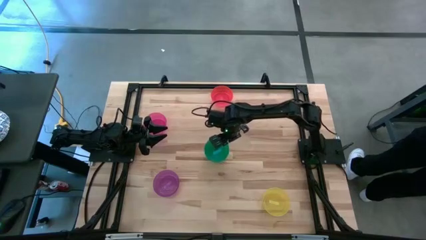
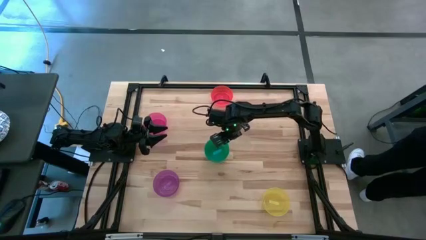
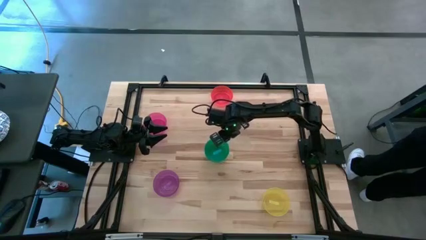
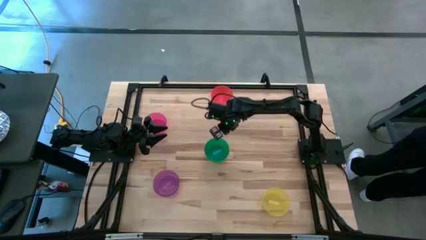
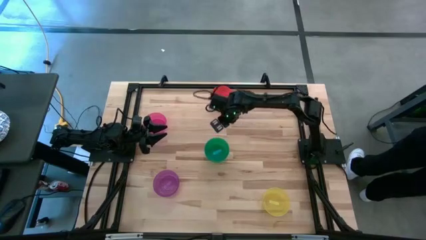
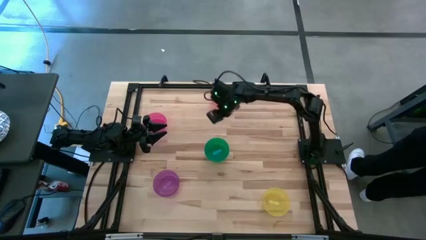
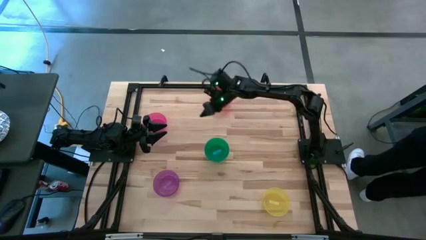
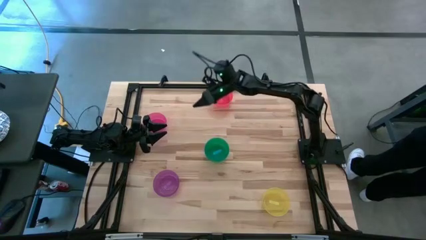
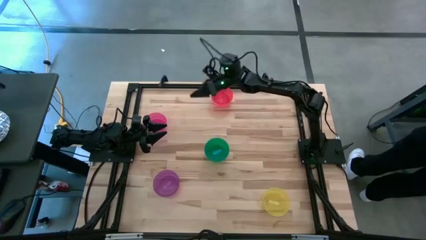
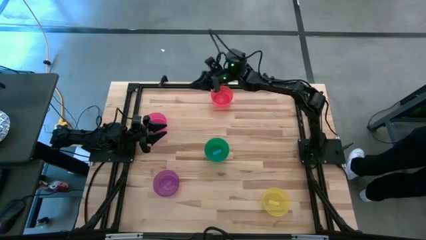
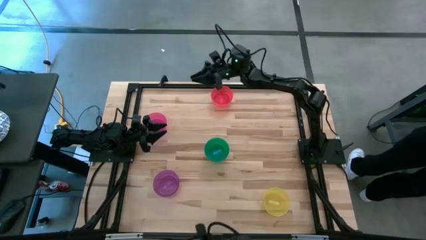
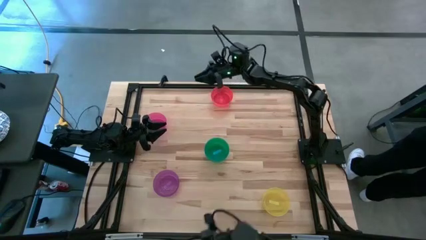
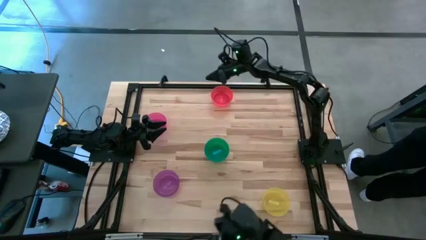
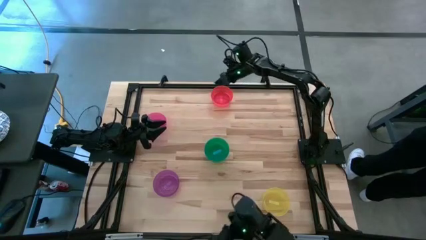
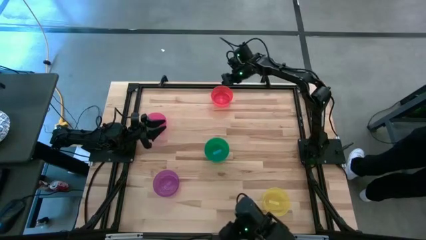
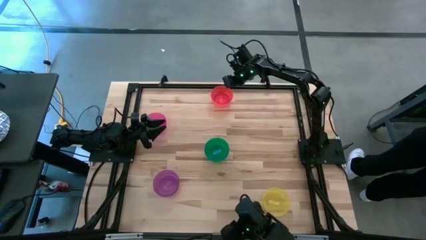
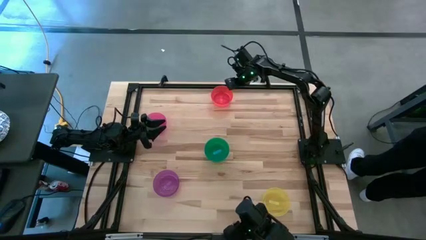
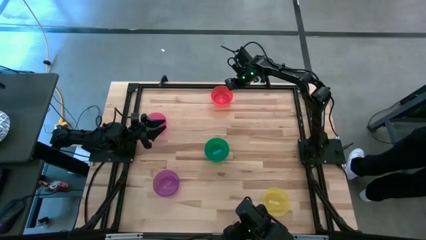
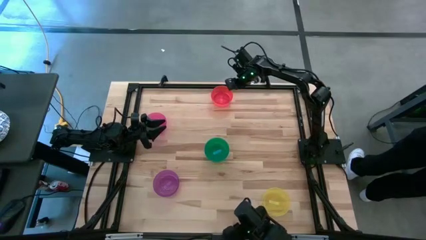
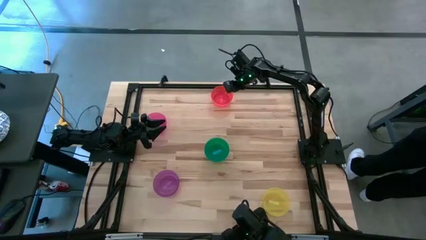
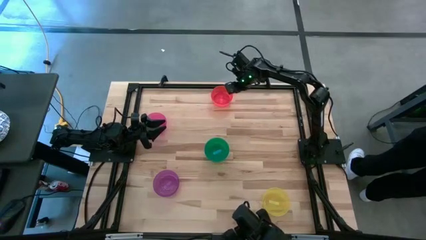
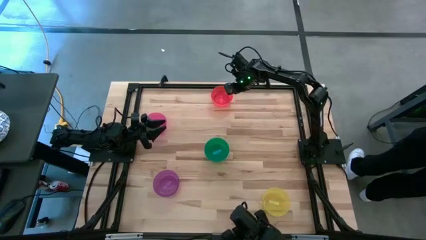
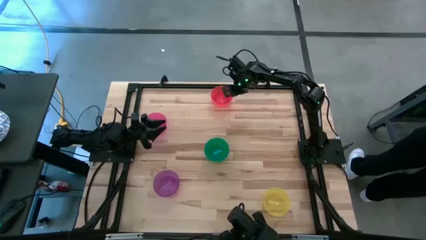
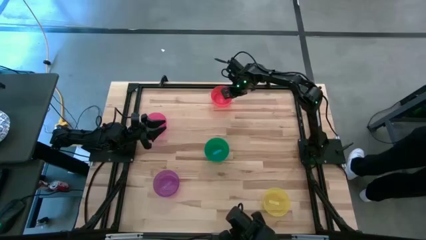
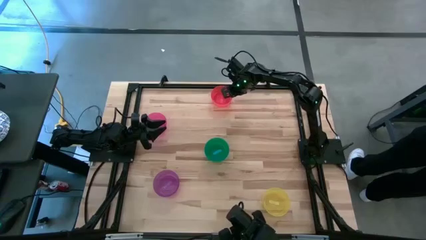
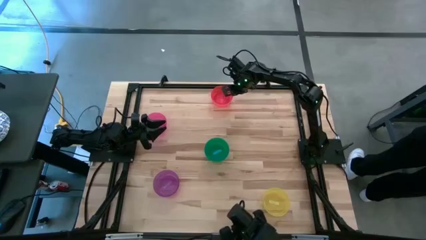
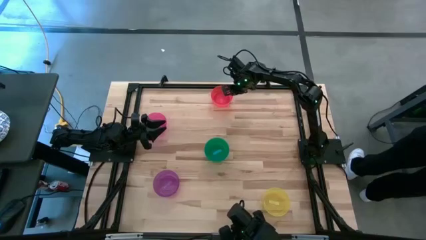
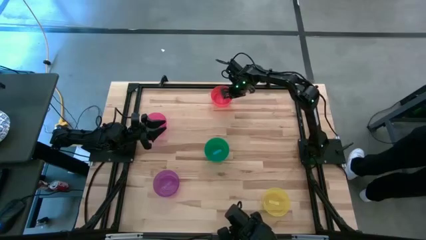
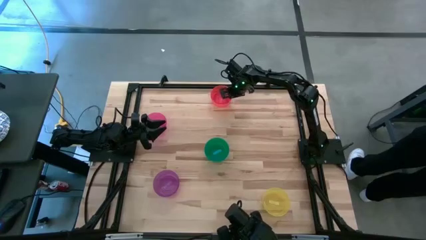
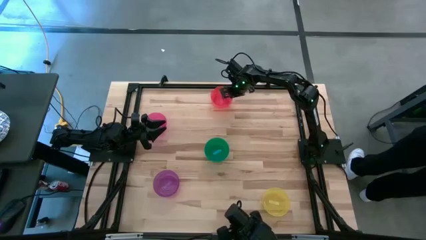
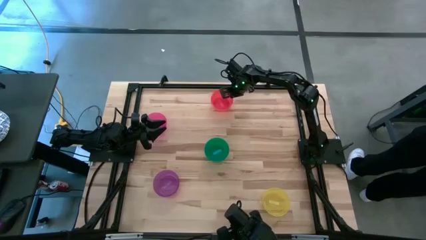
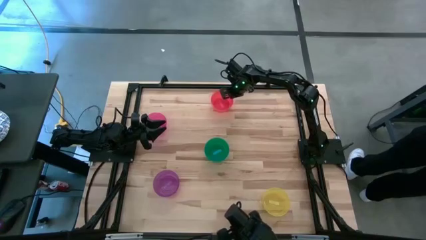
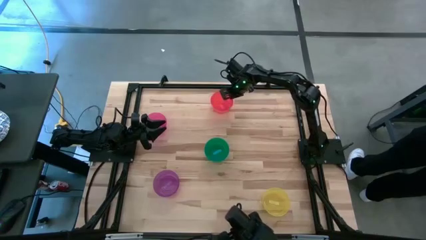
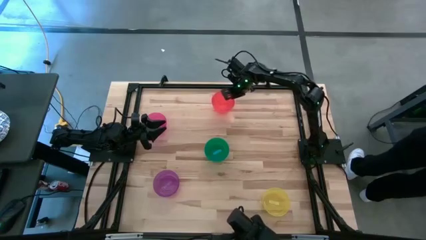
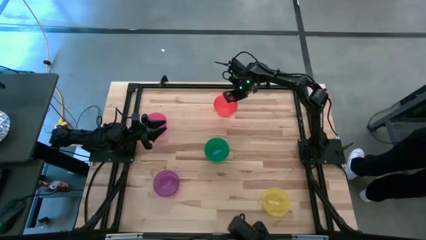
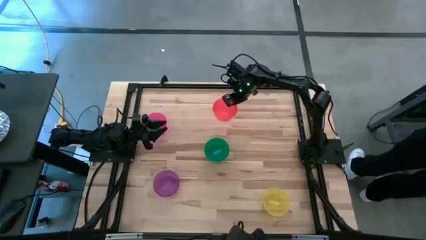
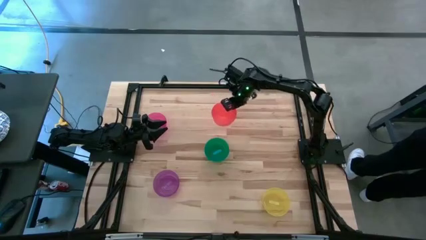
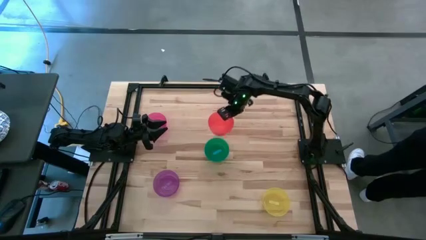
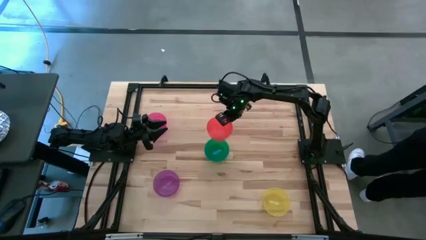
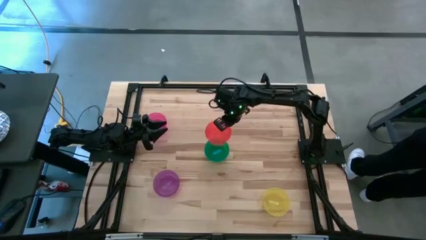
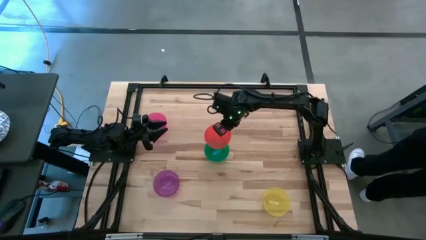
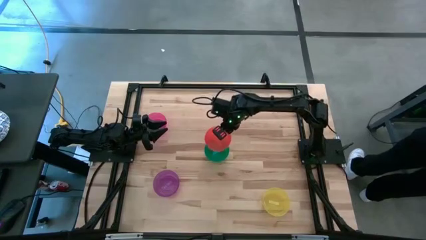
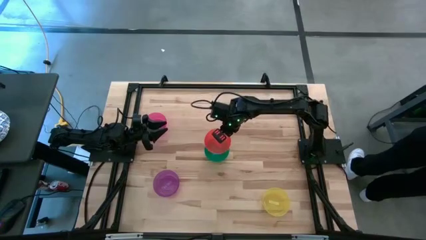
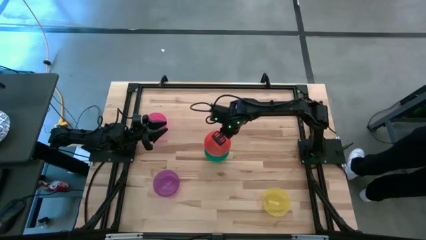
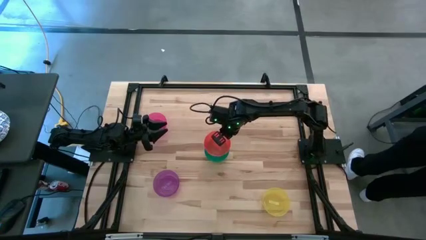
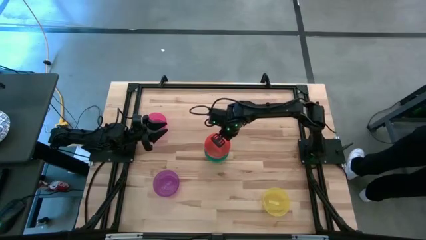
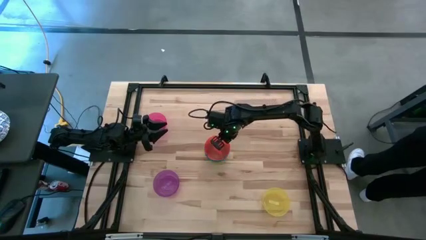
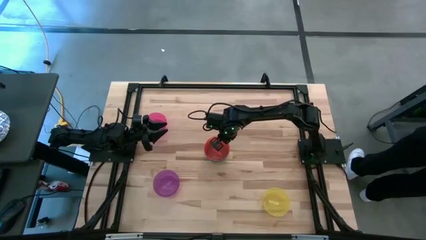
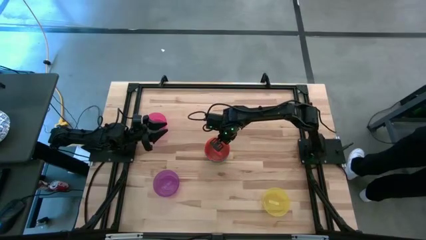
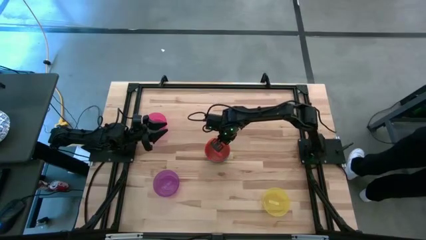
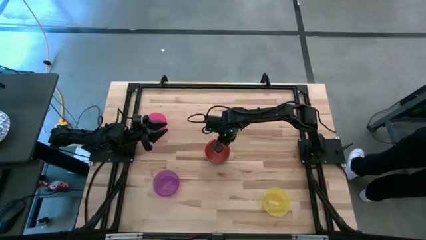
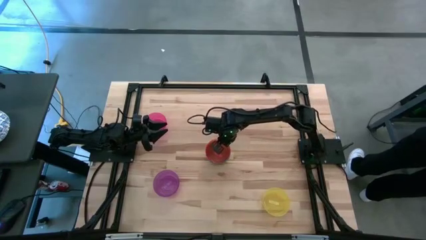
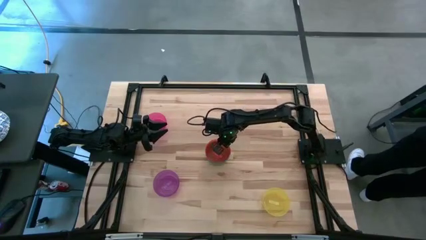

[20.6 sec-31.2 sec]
Task: Nest bowls inside each other
Stack the orange bowl on the blue bowl

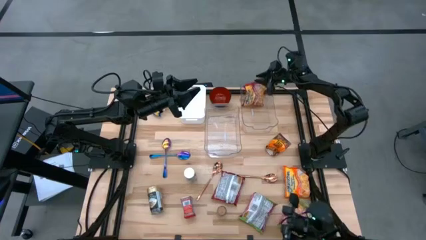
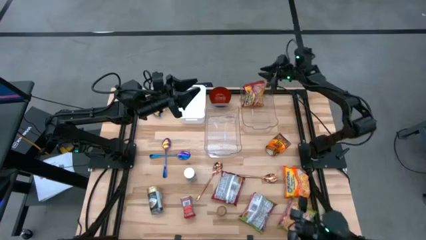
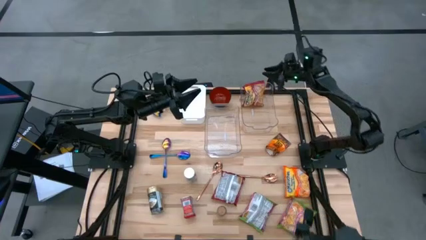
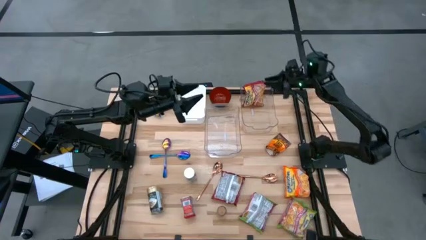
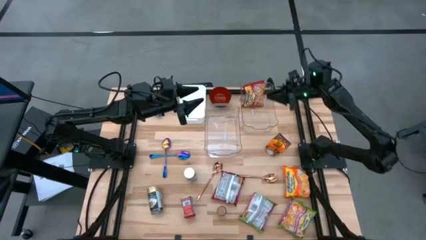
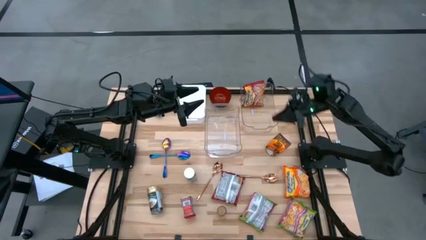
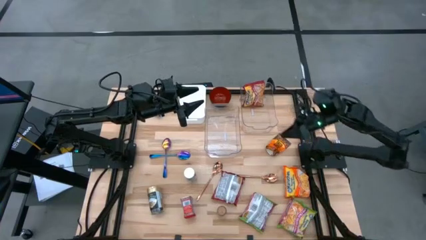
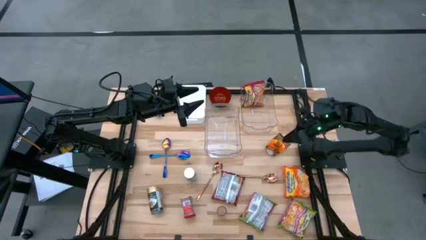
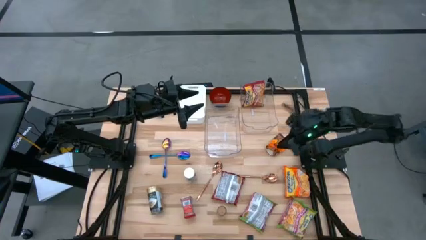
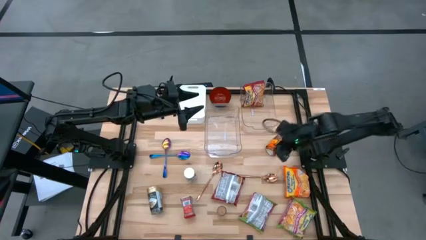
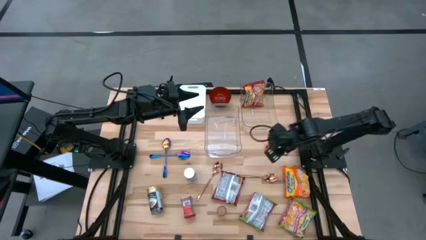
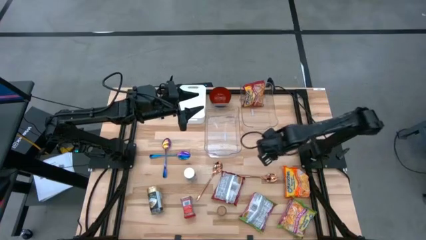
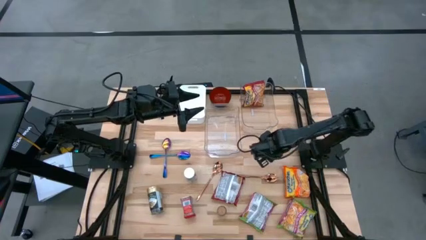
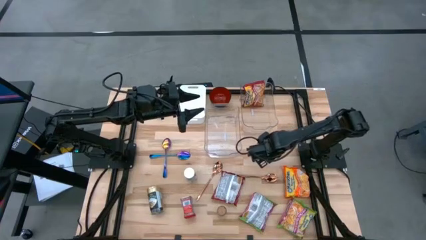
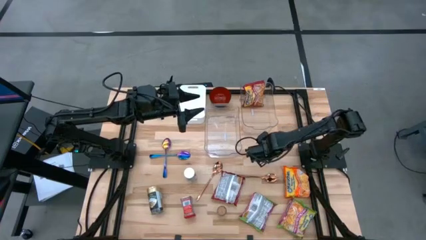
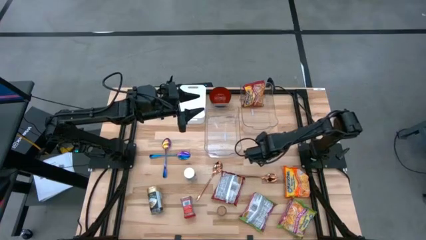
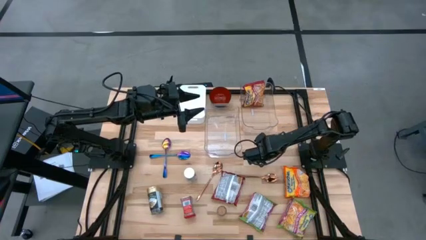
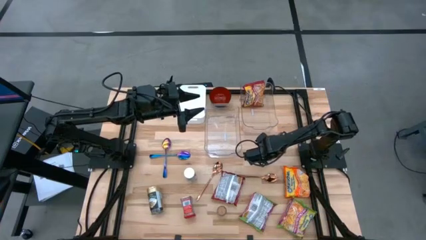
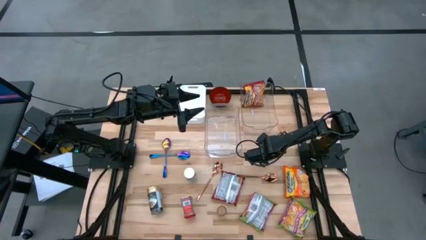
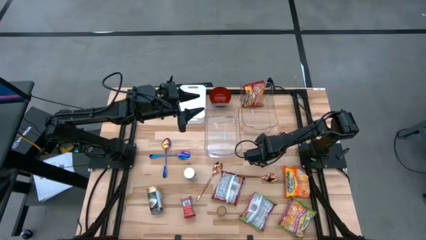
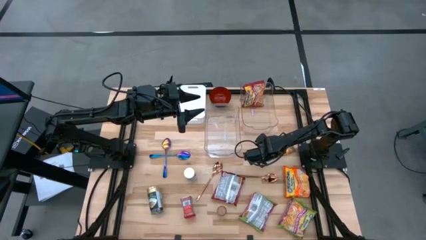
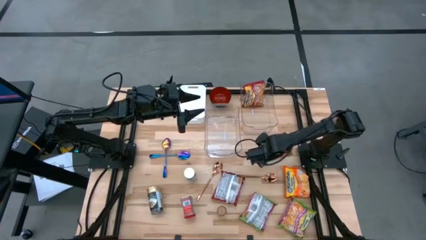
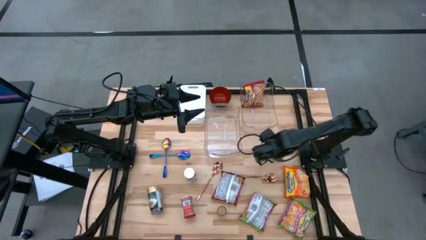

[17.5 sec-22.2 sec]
Task: Pick & Place Food Item
Put the orange spice pack into the left transparent bin
